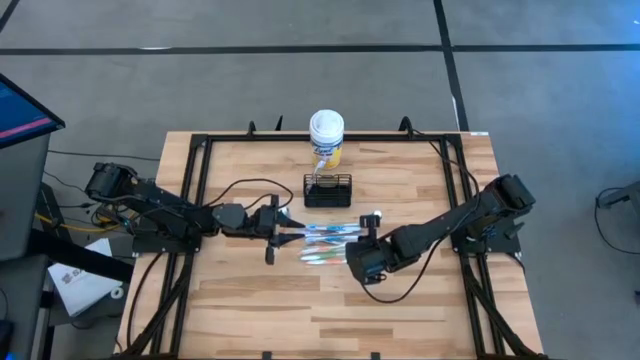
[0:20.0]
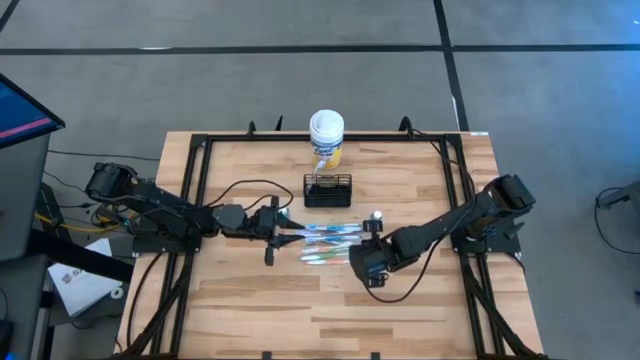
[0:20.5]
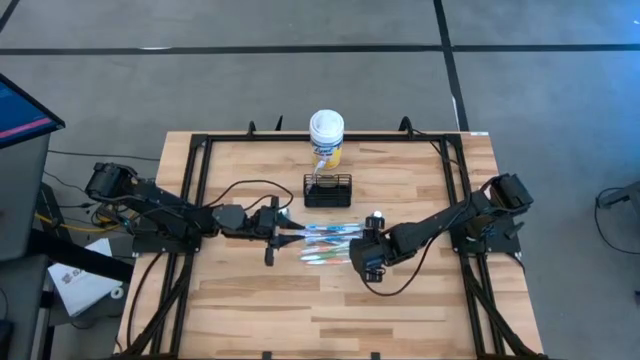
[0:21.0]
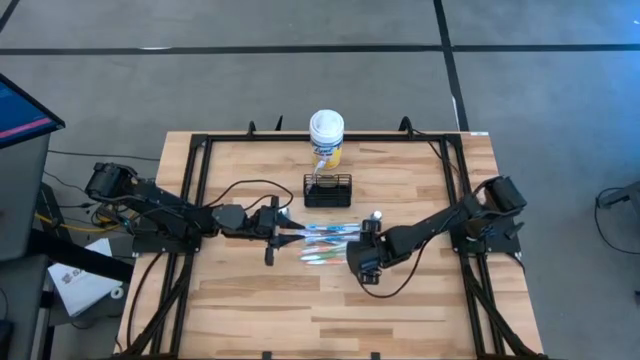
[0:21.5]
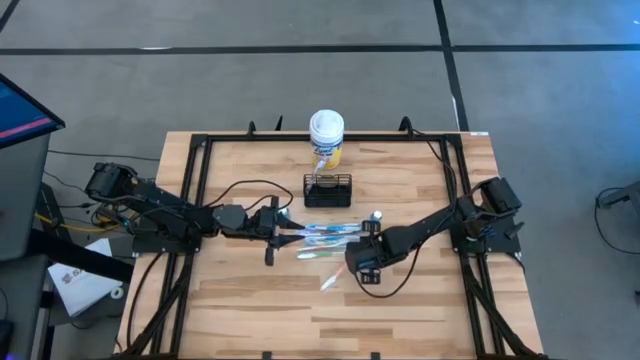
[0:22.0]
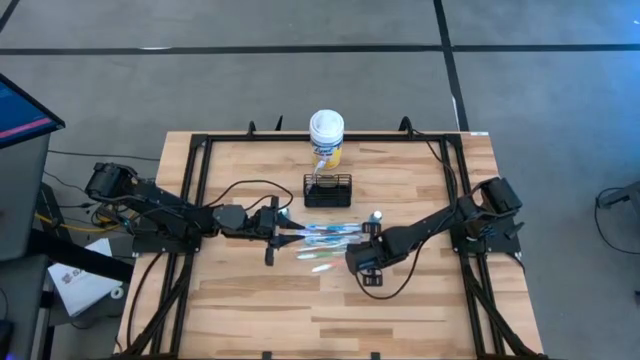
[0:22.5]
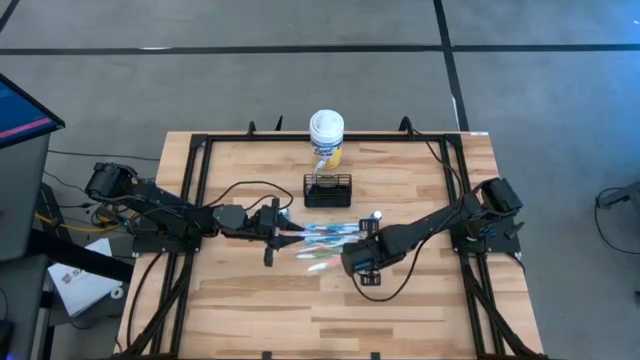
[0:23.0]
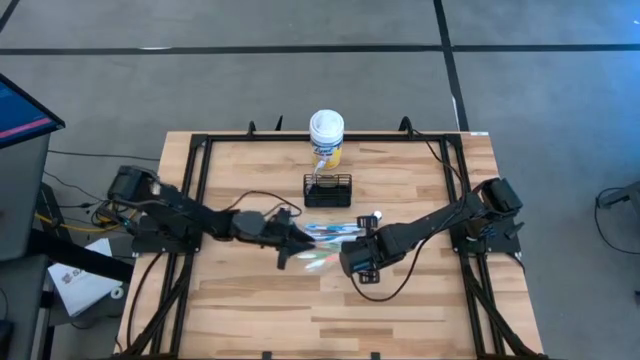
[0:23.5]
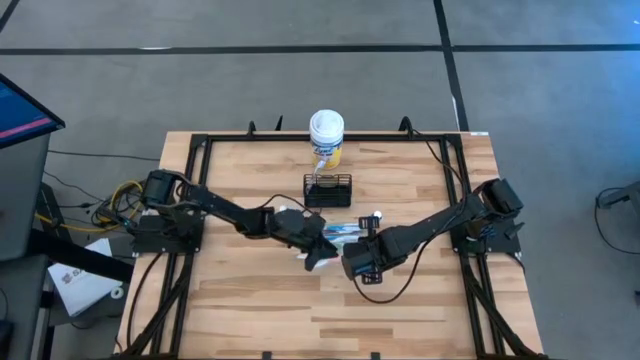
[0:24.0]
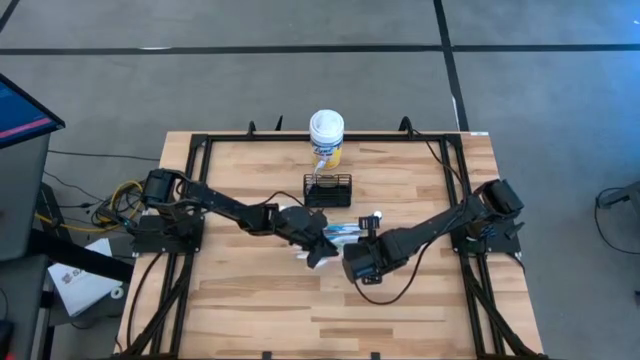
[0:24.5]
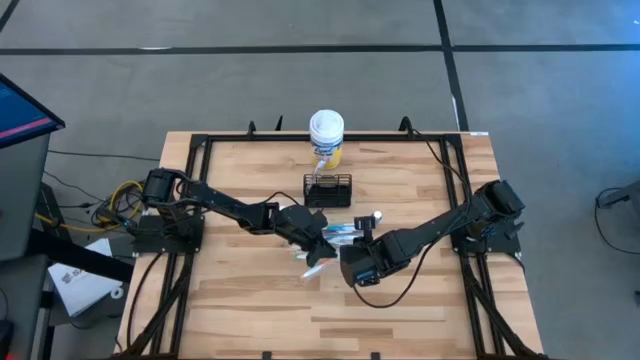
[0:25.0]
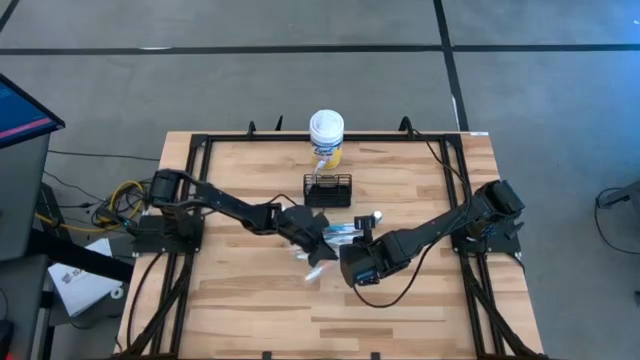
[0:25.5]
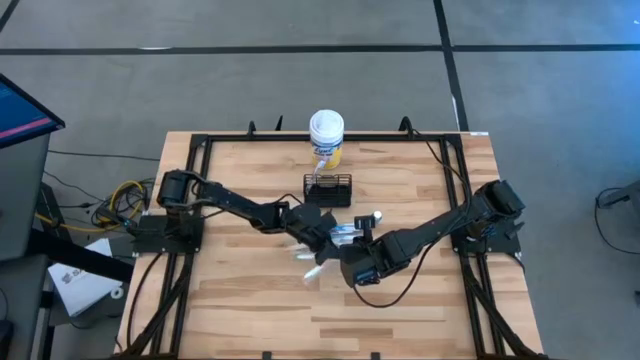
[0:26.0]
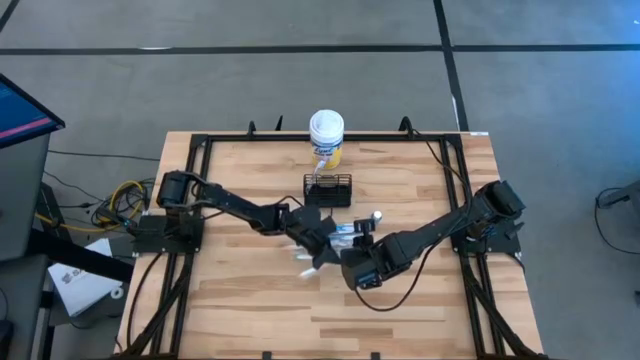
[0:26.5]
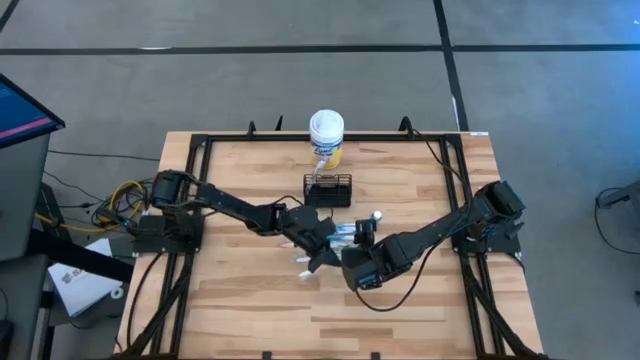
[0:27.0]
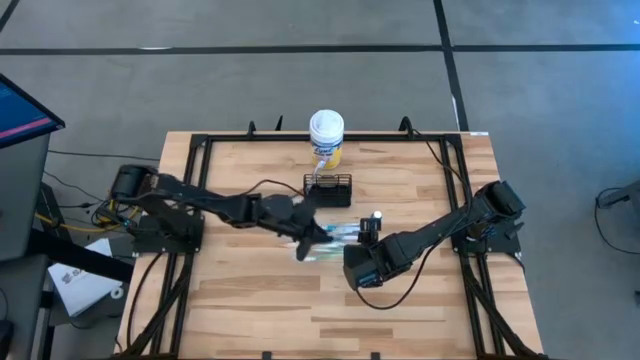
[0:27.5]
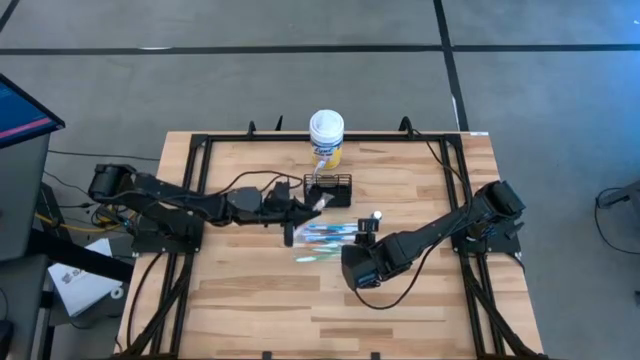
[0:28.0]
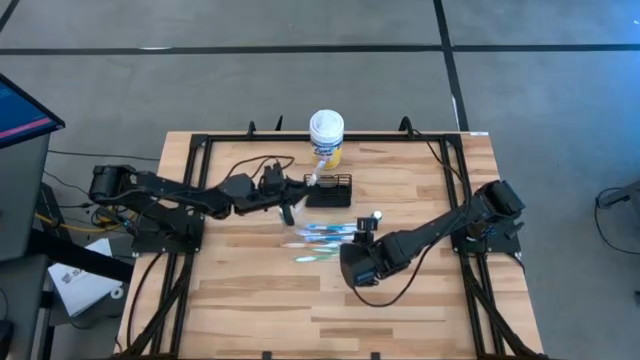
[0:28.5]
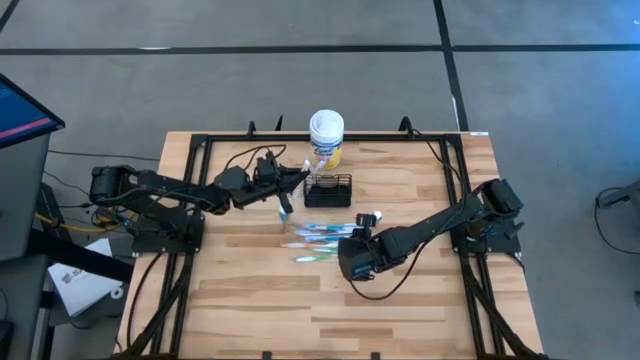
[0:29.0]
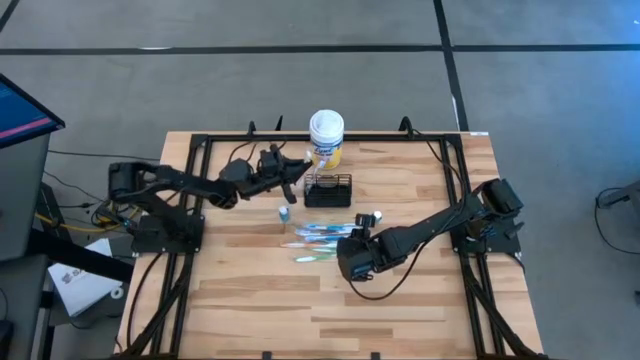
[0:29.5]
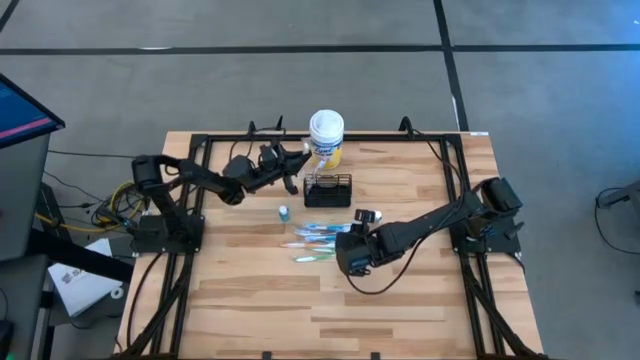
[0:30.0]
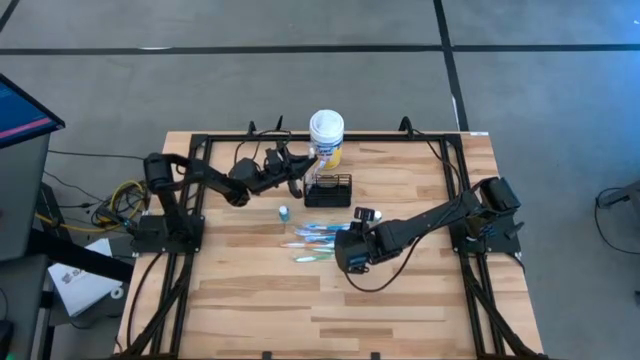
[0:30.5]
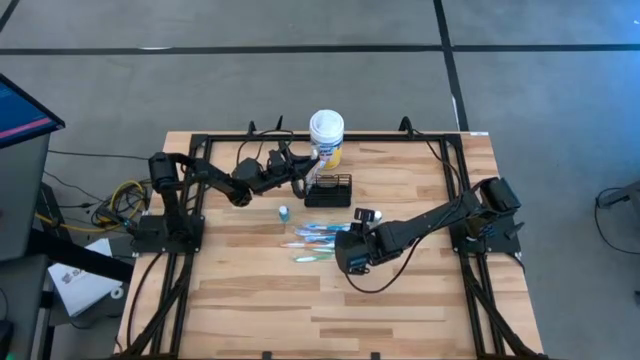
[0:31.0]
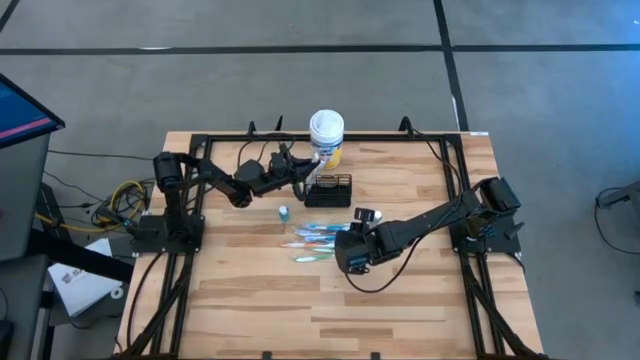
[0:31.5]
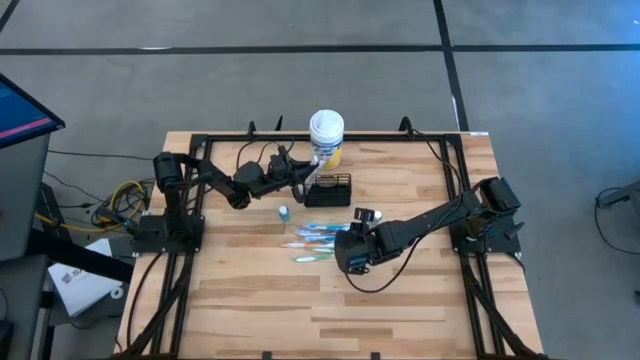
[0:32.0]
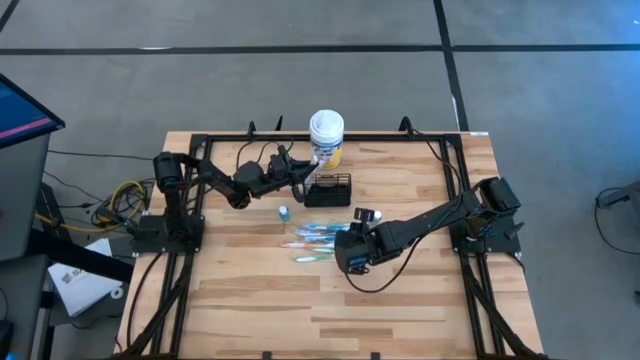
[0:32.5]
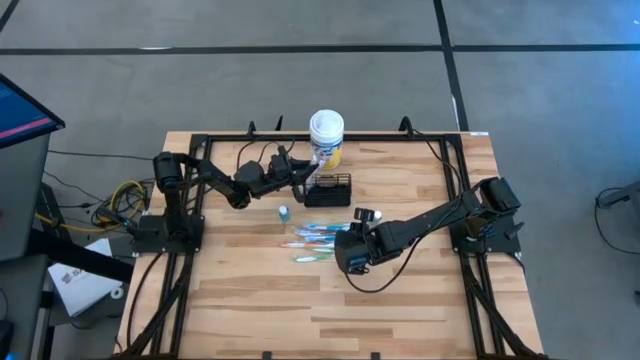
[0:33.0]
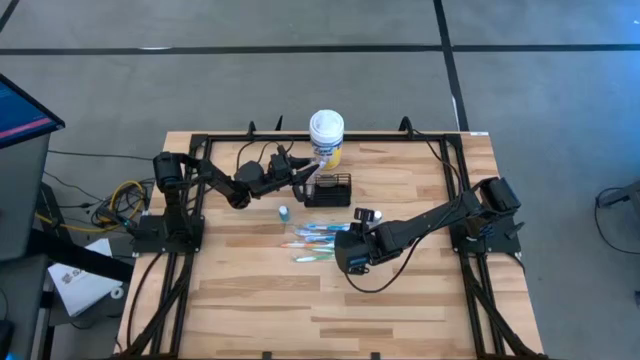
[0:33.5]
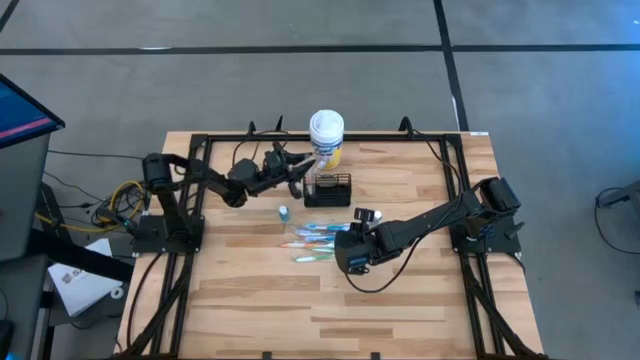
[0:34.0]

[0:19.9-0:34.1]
Task: Pick & Place toothbrushing station
Put the orange toothbrush into the black wire organizer

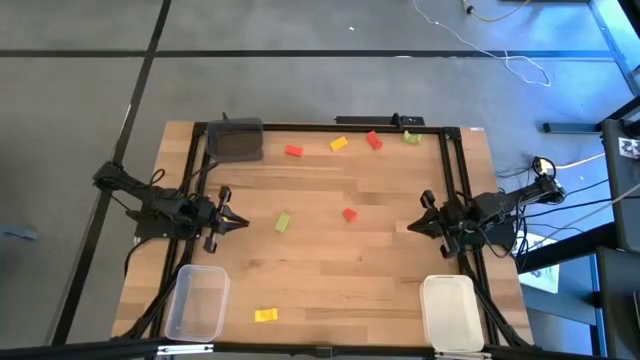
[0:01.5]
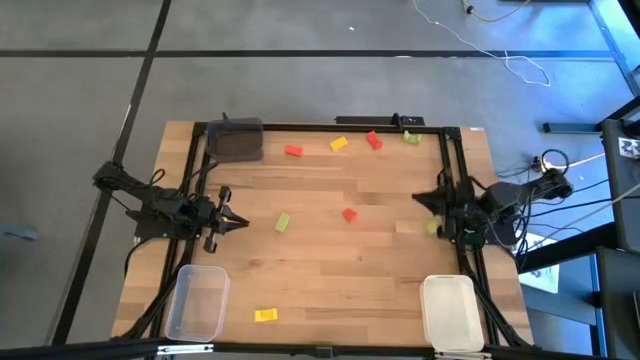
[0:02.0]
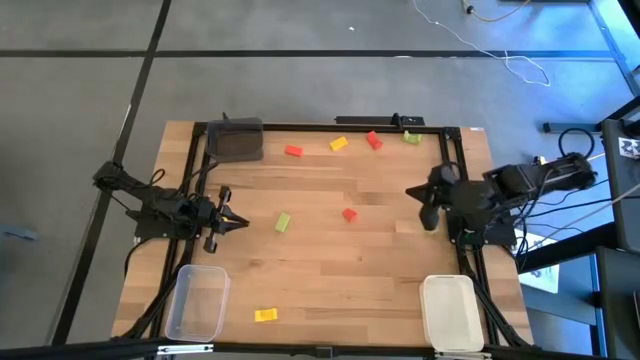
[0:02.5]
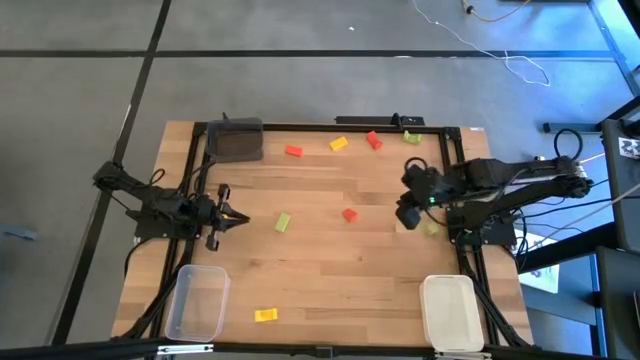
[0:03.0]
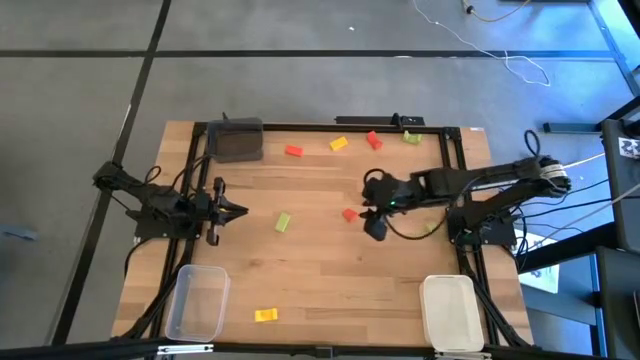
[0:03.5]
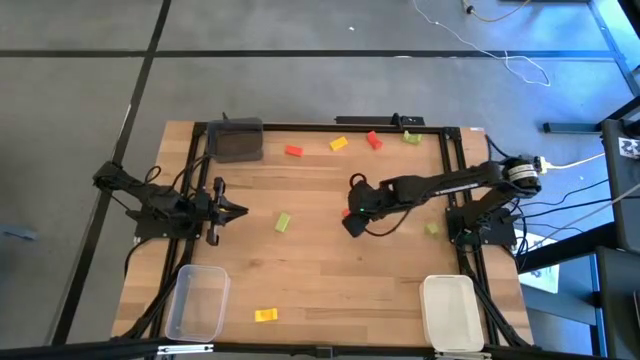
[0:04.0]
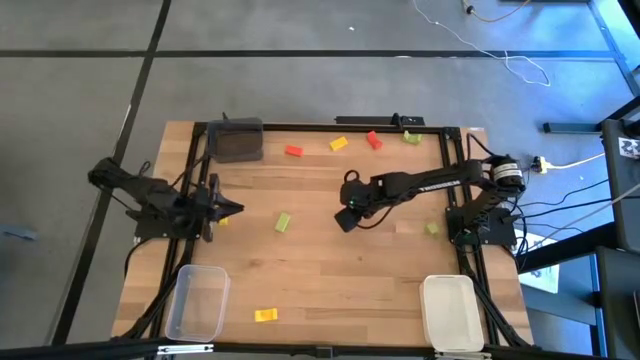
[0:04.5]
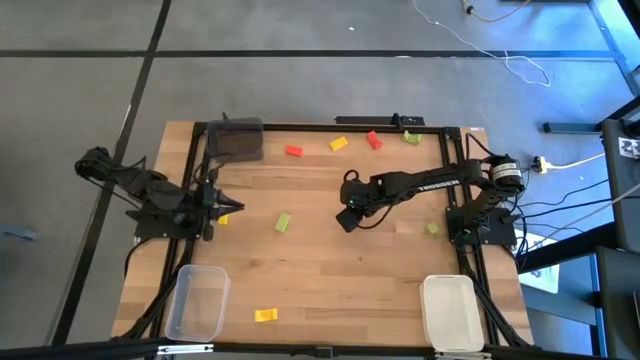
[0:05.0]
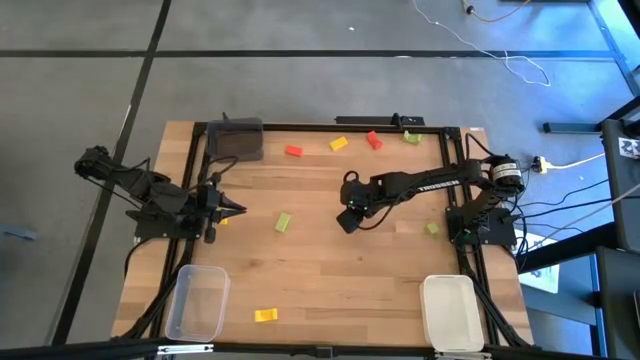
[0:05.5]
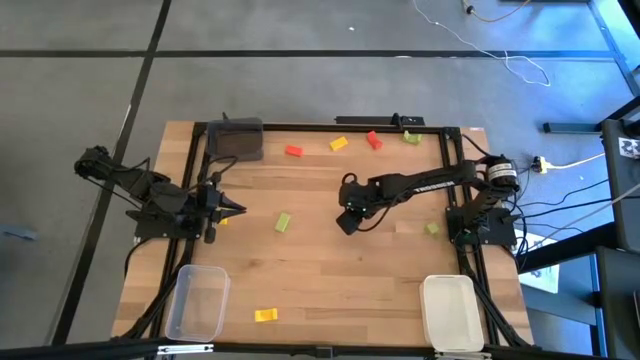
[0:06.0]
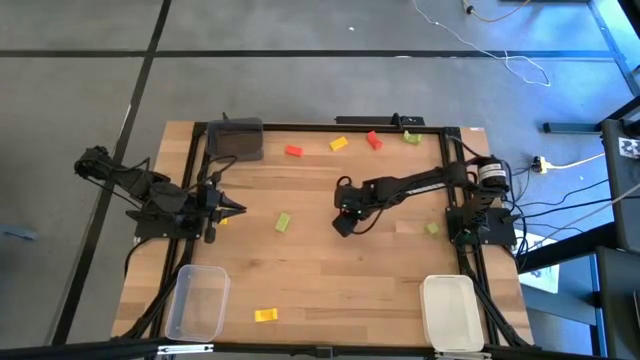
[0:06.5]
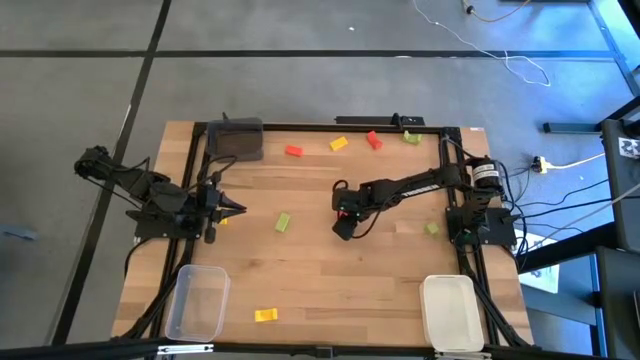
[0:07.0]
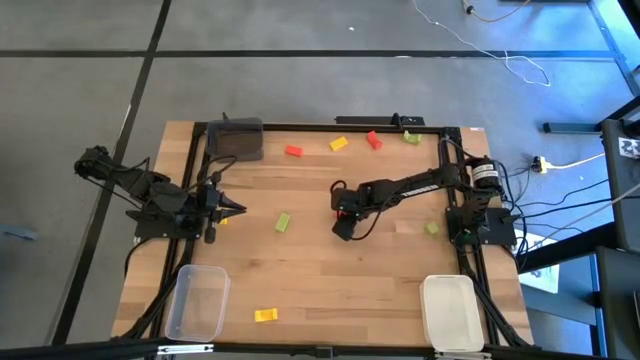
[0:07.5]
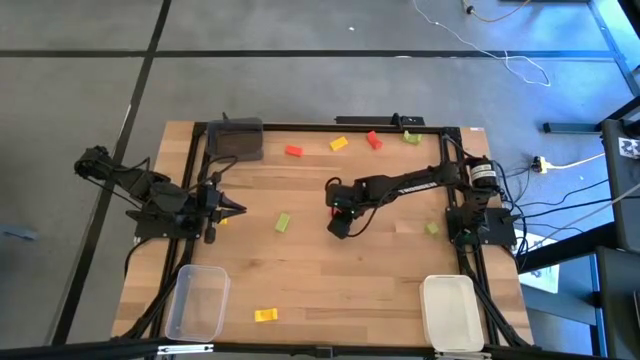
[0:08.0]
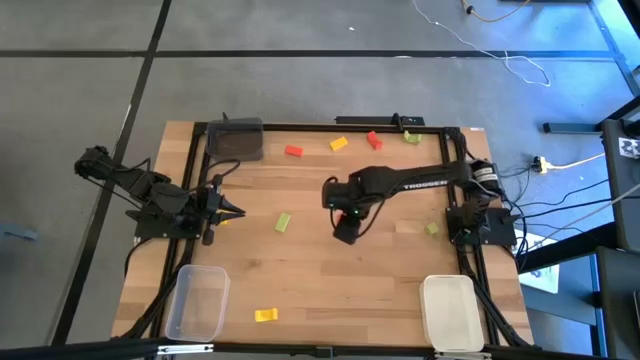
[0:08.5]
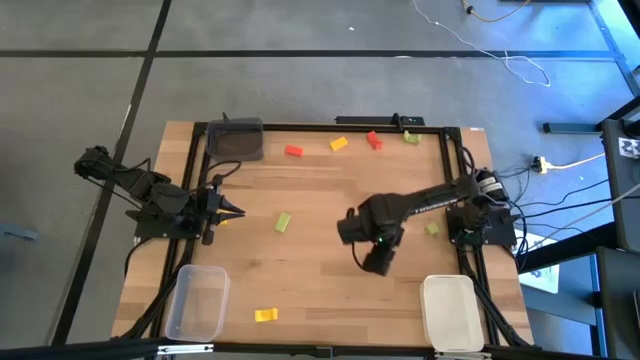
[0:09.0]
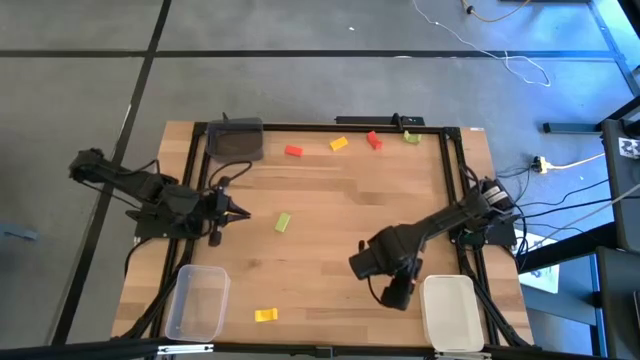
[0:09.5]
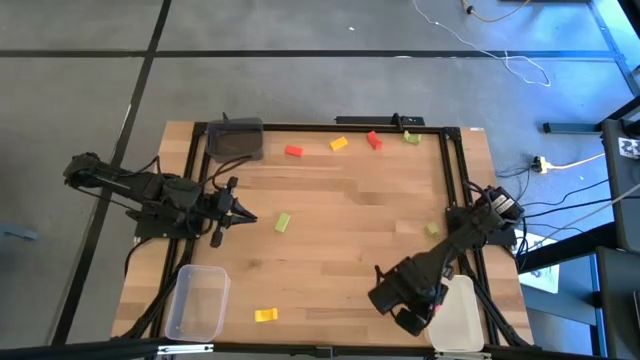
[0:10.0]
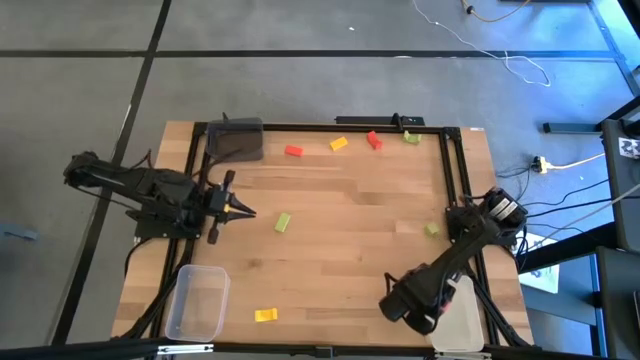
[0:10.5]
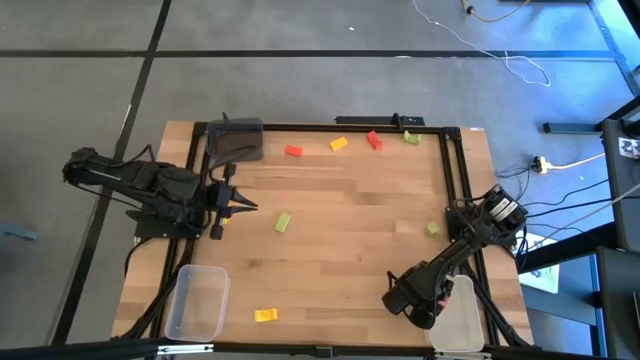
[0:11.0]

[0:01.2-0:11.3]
Task: Sort & place blocks by color
Put the bottom orange block into the white bin
